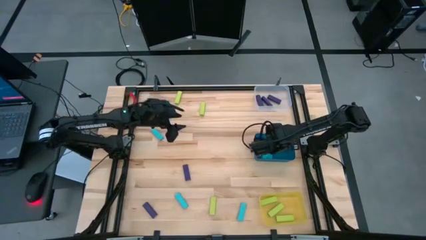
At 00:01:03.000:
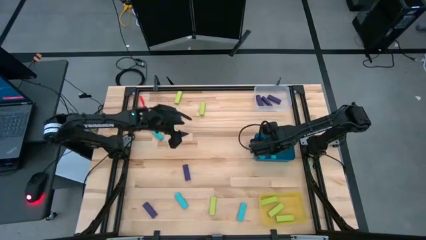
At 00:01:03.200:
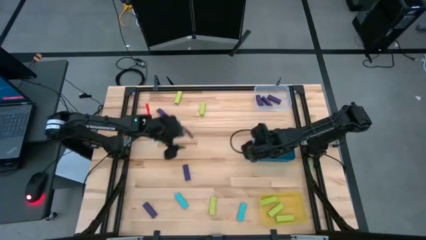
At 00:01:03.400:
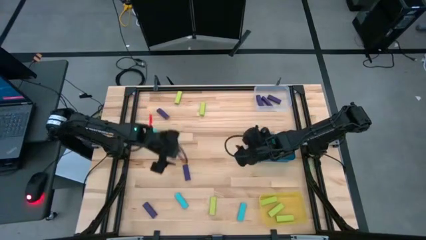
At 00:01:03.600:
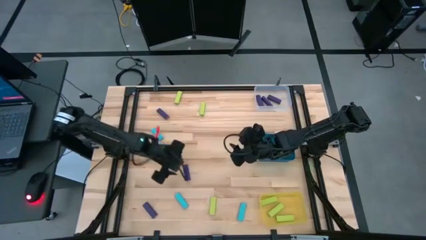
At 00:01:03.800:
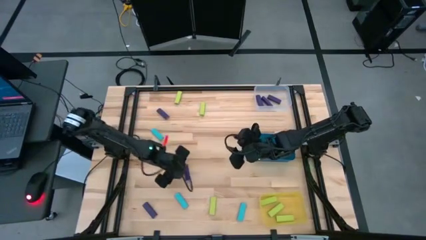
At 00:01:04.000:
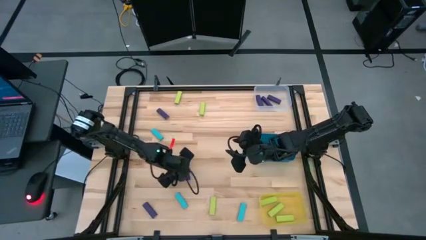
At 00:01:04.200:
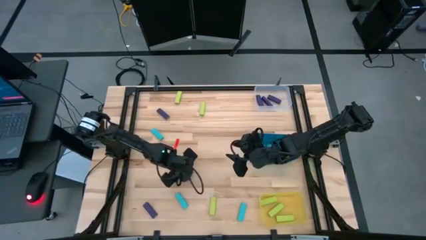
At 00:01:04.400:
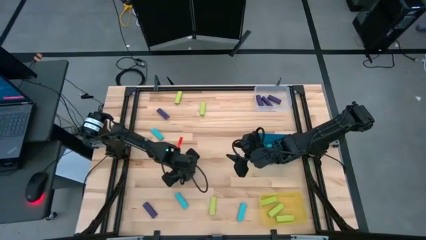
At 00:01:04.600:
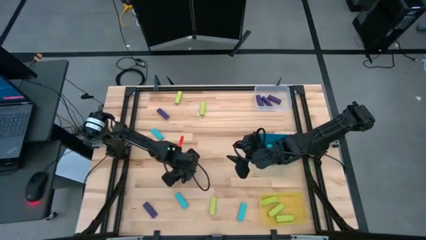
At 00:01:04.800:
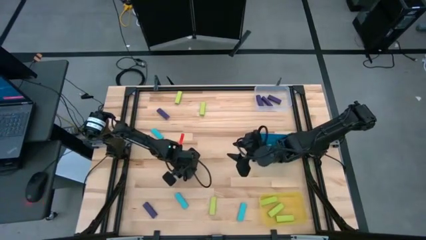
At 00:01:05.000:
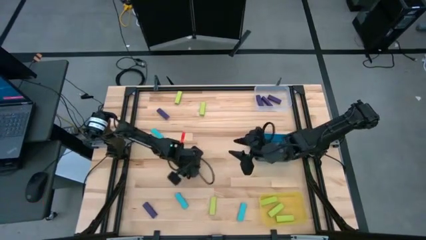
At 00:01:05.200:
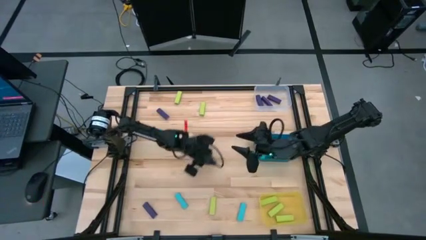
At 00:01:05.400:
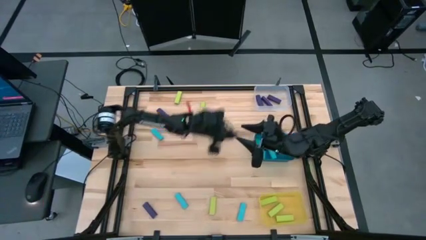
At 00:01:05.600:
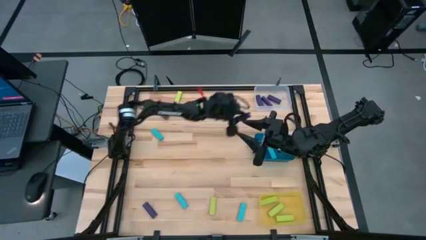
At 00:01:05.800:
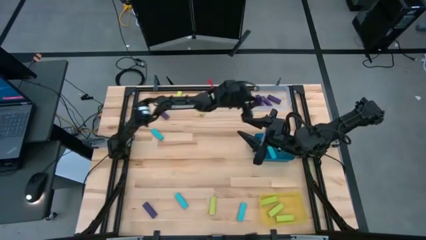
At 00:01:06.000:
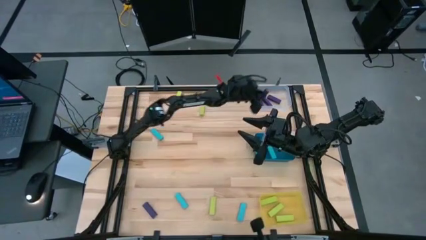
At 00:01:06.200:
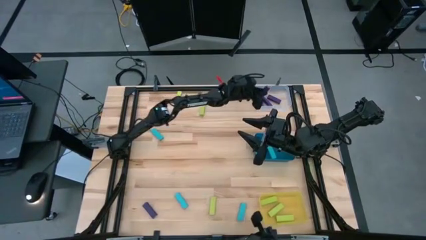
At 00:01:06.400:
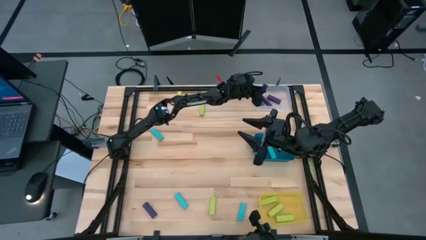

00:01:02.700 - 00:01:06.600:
Task: Sort blocks
Put the purple block into the transparent bin

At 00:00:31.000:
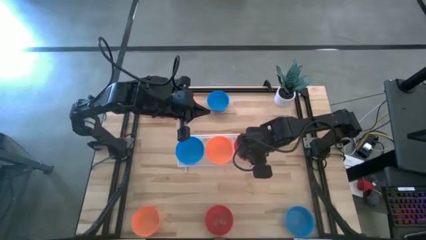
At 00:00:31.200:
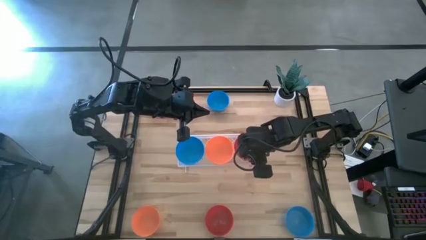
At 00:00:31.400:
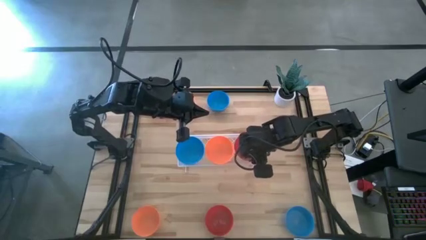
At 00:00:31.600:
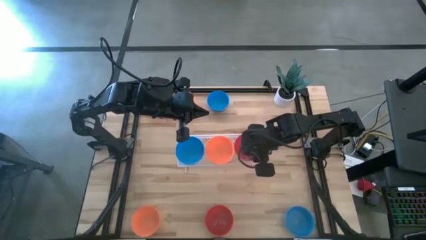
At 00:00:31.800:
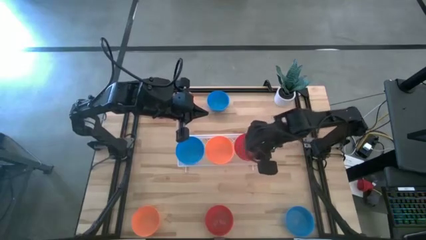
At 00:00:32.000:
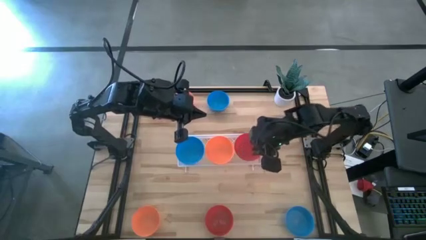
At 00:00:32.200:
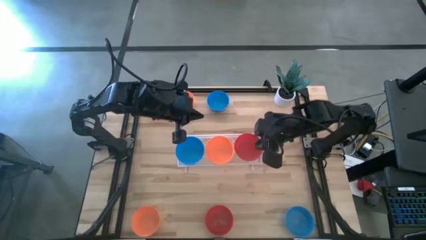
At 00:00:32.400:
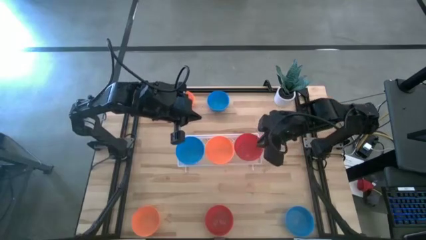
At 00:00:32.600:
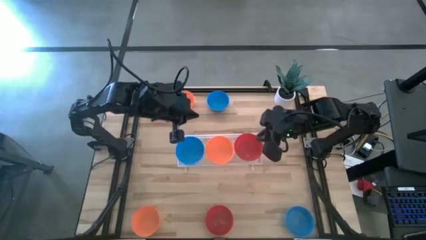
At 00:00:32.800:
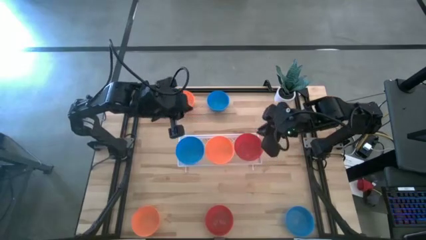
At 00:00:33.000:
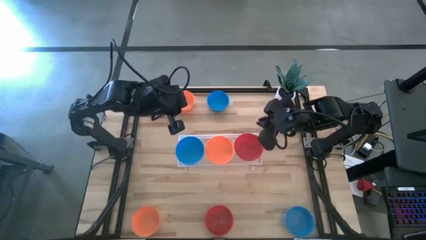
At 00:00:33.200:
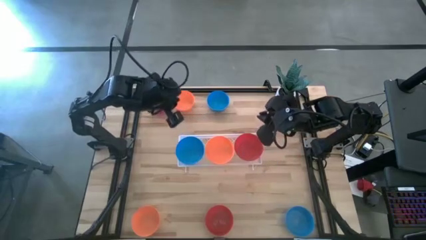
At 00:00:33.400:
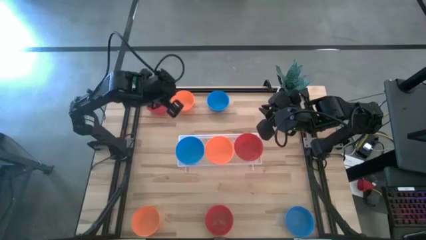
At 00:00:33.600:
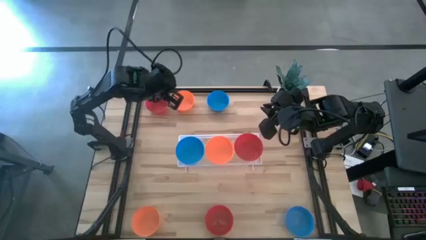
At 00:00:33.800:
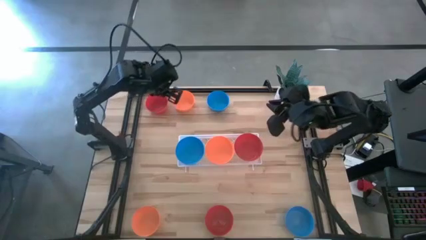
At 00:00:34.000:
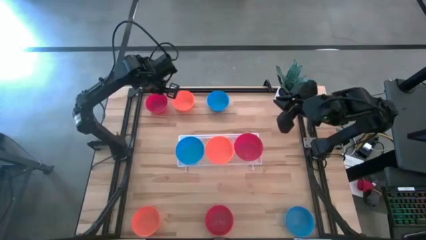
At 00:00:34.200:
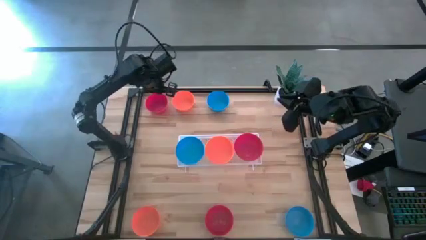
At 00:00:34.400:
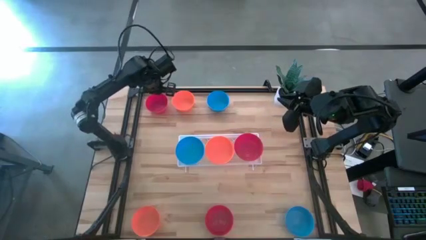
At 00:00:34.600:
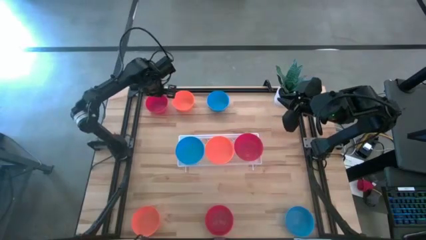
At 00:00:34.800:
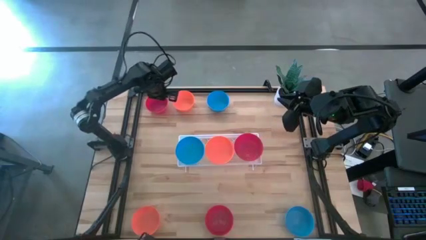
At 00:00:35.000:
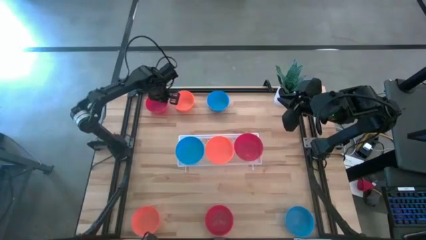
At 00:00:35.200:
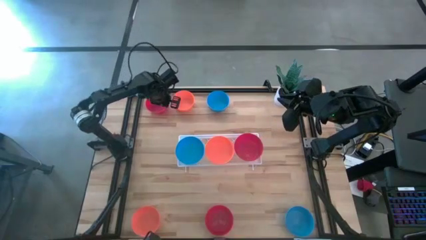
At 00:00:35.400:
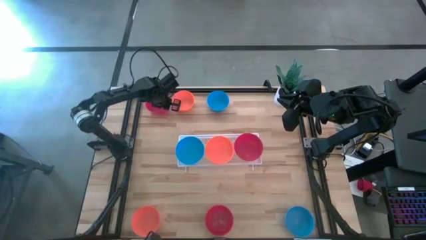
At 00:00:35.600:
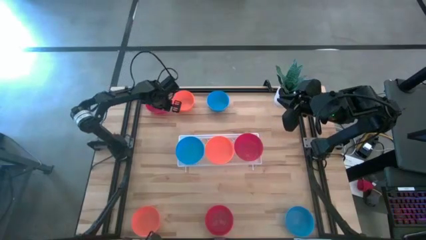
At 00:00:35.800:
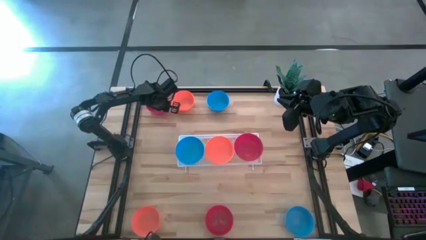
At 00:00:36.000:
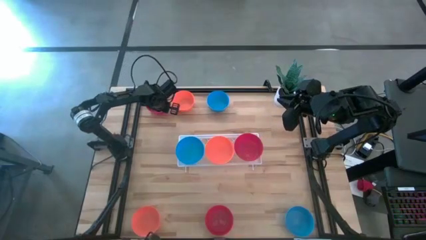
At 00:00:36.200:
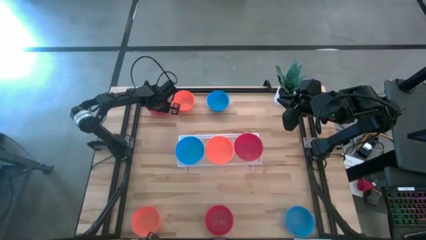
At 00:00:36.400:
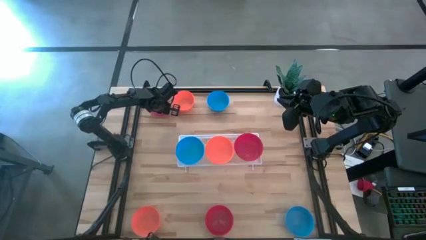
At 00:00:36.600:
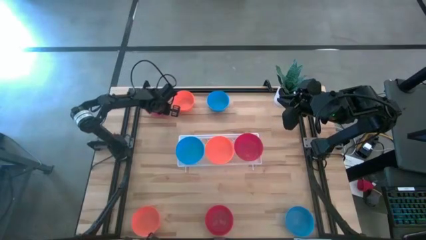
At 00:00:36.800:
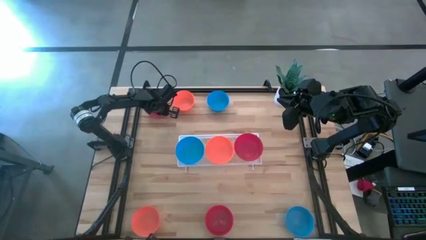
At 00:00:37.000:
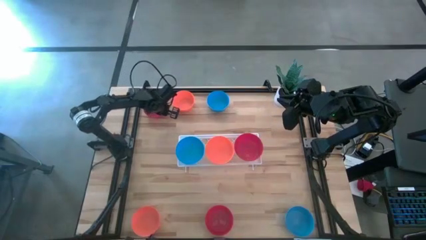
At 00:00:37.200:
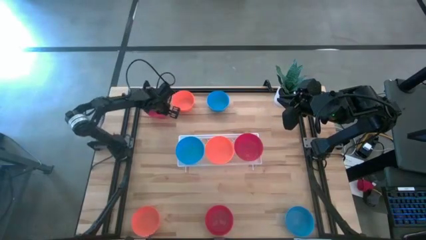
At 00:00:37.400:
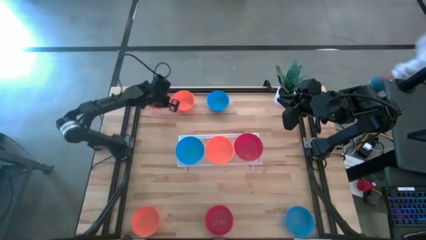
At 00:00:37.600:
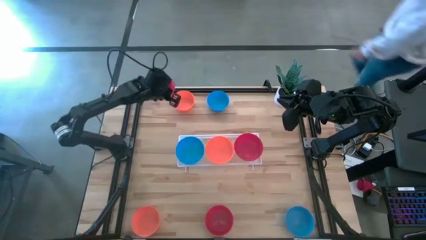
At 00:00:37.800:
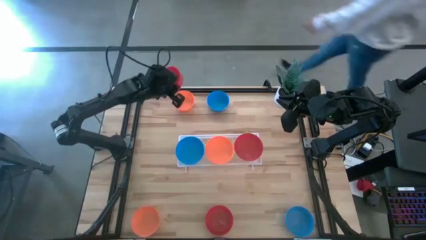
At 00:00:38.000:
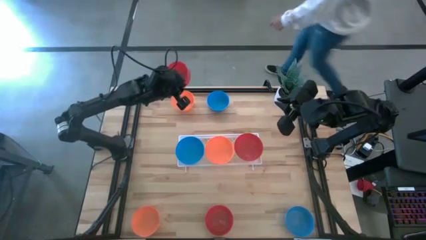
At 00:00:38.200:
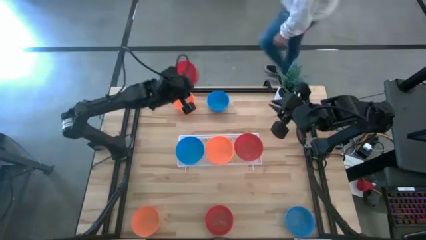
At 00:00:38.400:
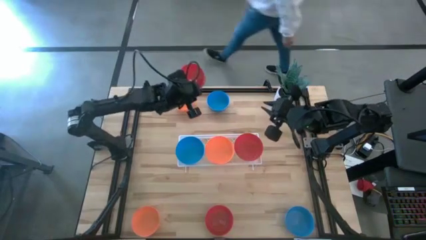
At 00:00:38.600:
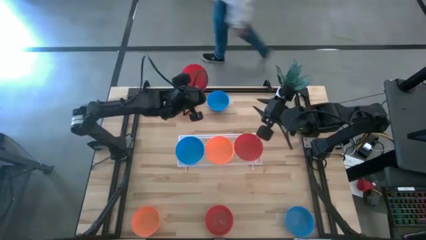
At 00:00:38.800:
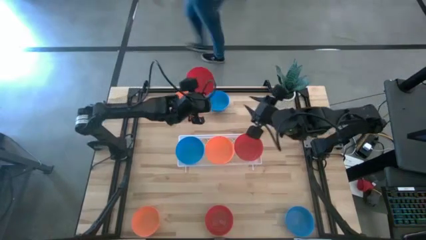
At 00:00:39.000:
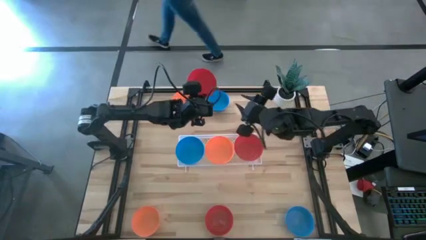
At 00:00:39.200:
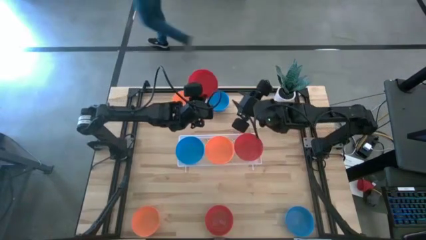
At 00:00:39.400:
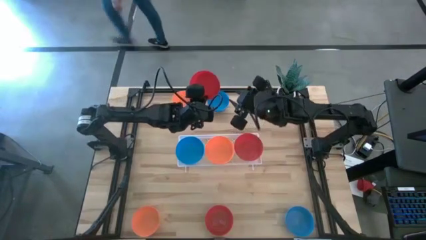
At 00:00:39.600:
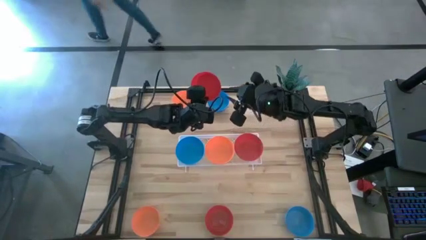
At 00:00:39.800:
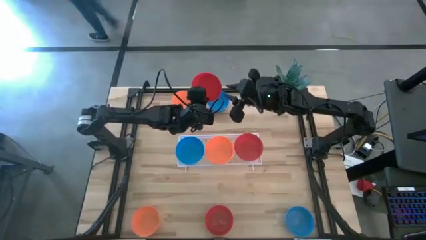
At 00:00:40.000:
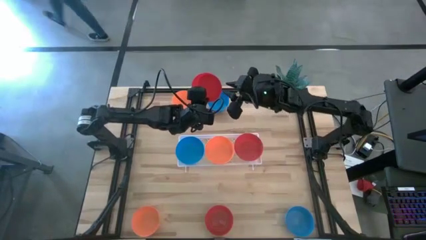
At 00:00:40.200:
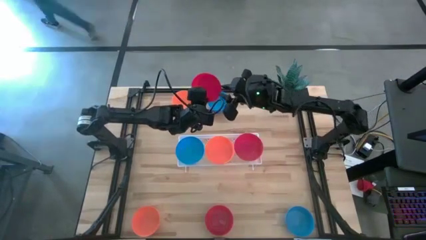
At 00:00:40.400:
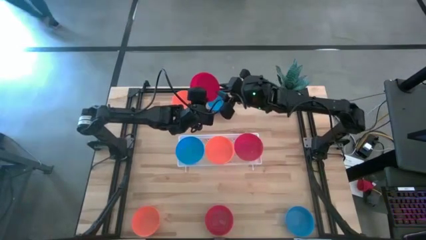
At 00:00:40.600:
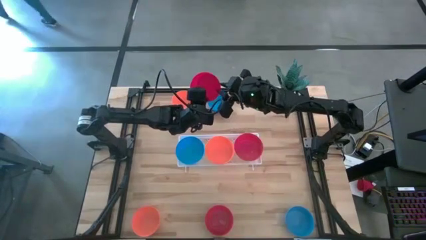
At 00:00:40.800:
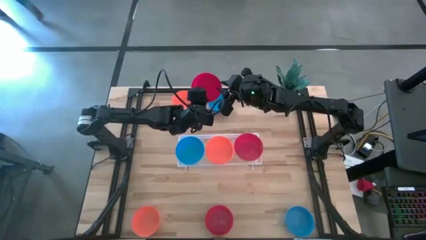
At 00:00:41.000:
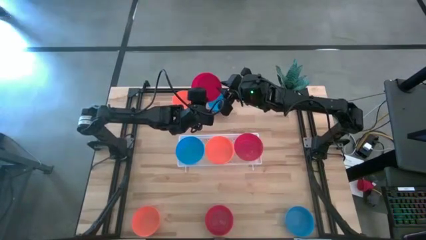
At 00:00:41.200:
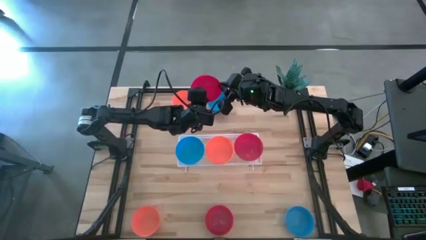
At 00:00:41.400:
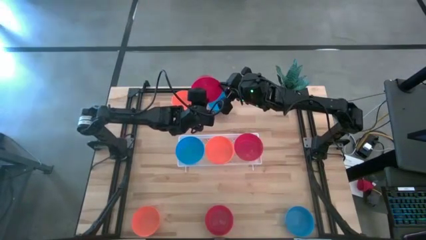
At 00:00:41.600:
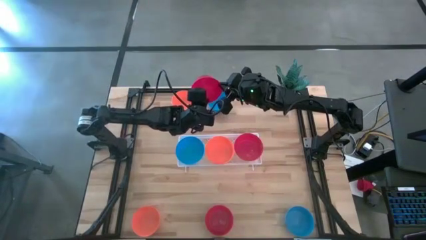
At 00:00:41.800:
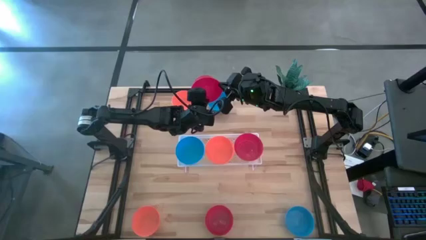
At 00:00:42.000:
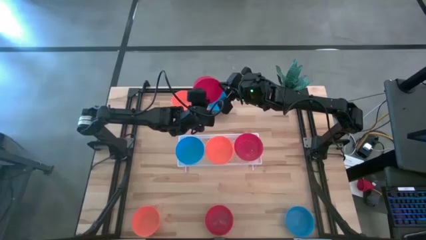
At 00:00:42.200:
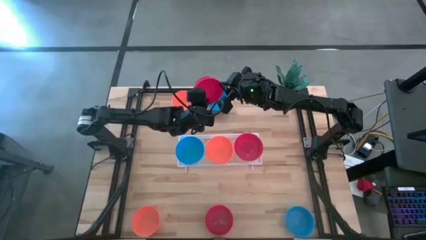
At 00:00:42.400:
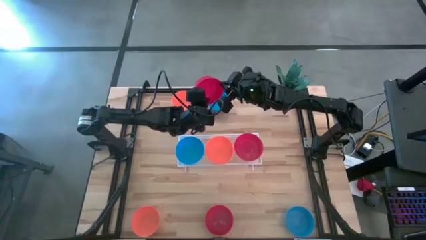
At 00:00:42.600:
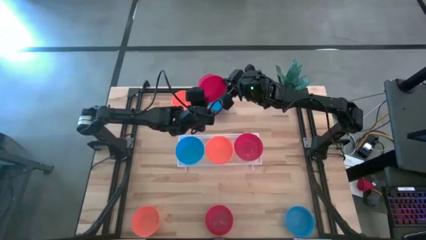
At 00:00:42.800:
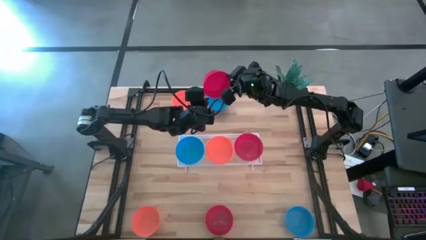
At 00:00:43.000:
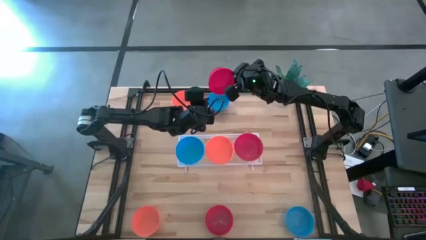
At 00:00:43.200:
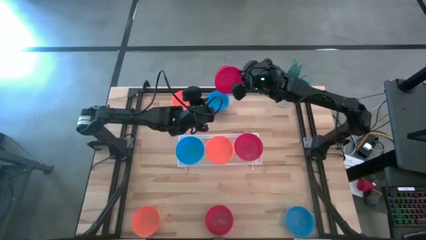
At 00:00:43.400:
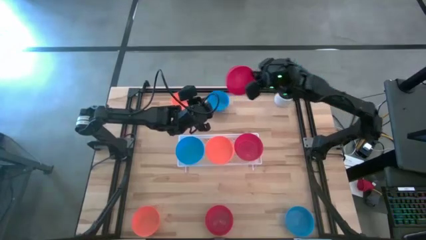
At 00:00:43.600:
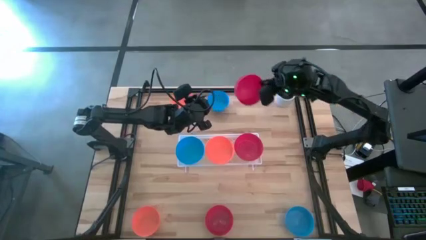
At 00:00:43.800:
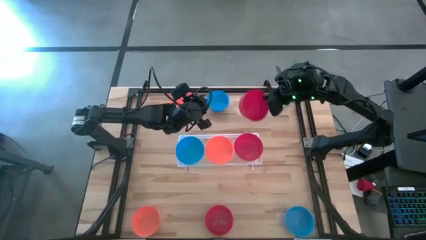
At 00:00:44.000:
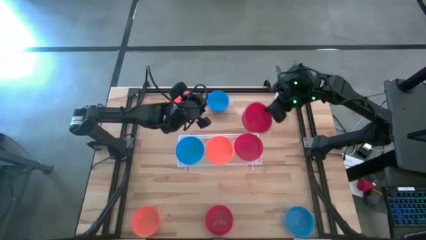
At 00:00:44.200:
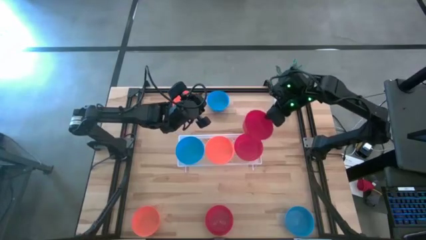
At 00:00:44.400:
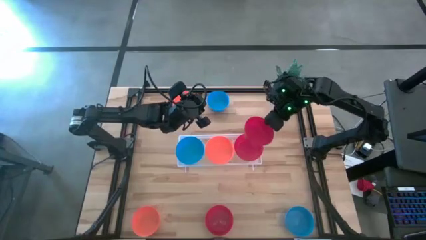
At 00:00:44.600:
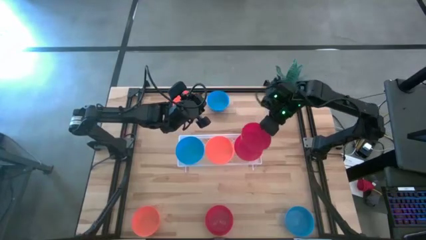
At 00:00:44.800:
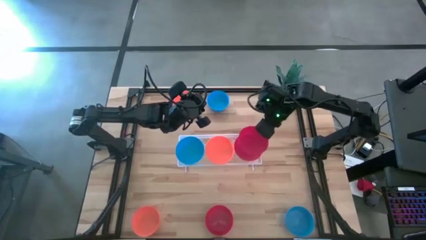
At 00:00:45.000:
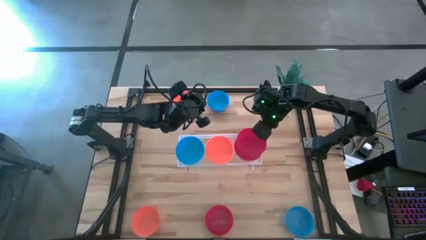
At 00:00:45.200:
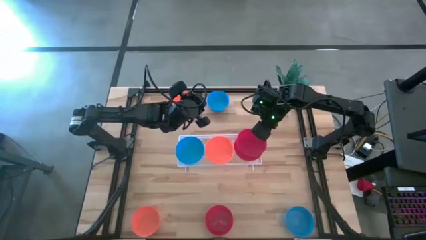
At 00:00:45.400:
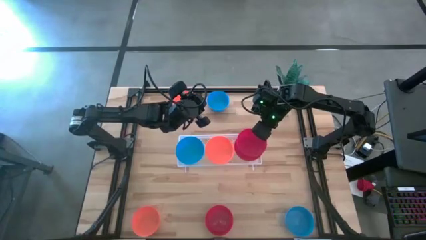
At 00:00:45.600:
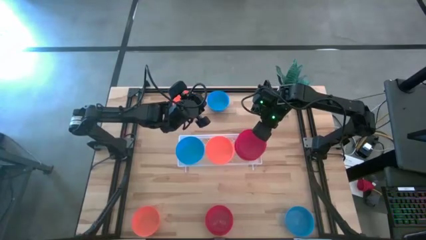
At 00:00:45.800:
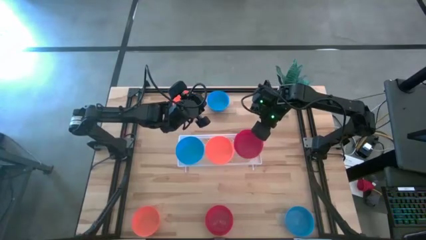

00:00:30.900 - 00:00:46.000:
Task: Pick & Place Mini bowls
Stack the top red bowl on the red bowl on the shelf
